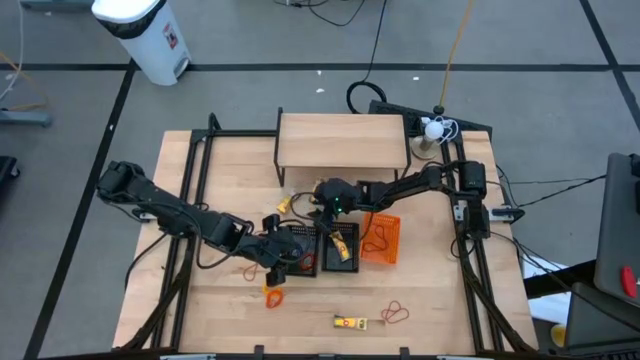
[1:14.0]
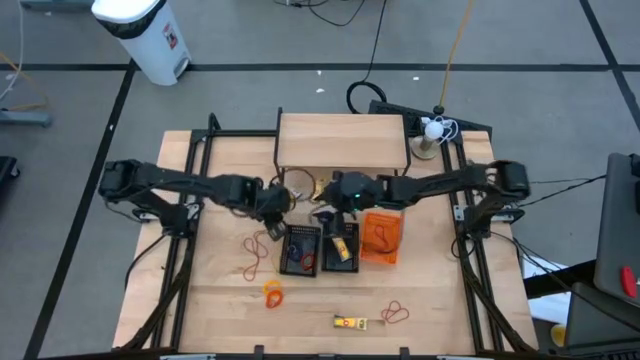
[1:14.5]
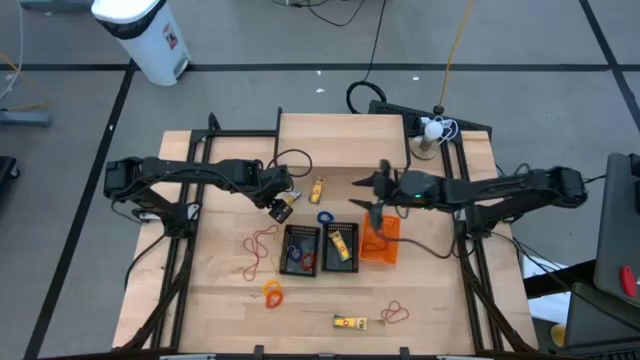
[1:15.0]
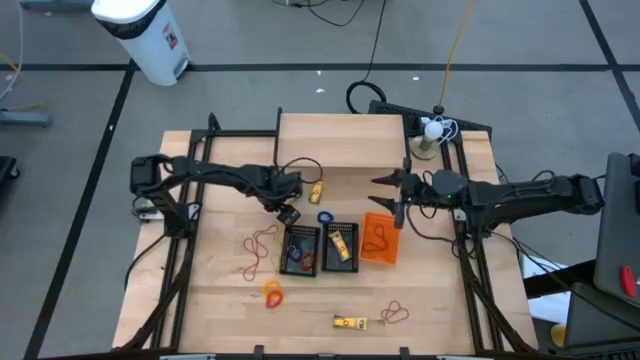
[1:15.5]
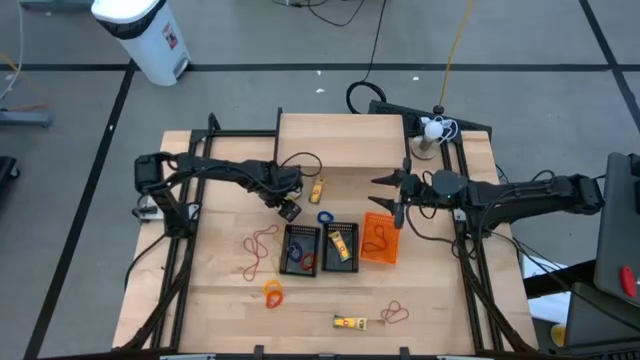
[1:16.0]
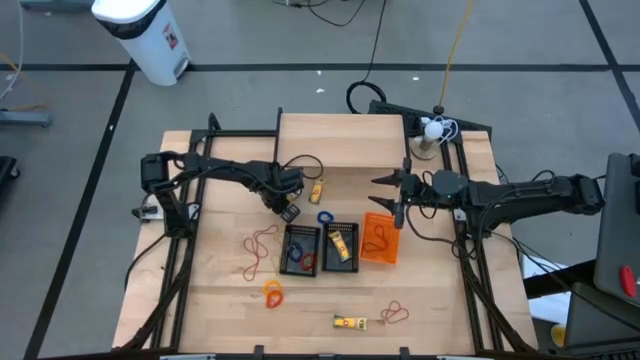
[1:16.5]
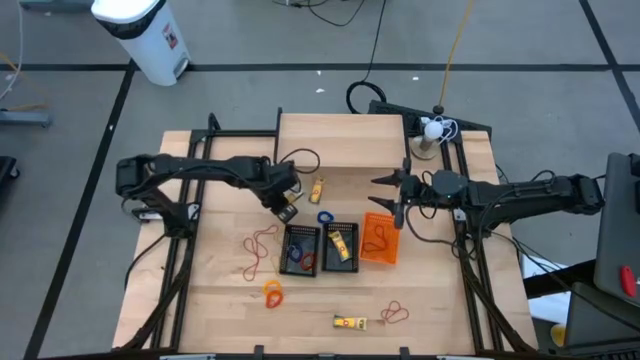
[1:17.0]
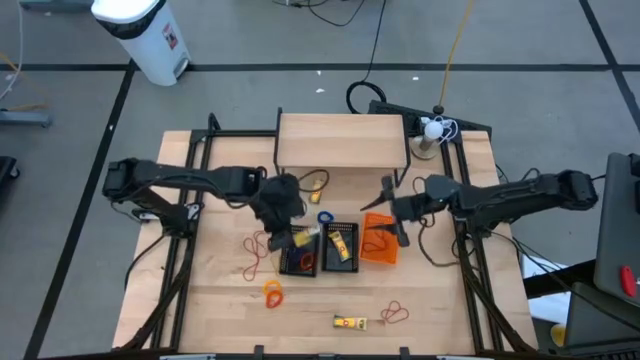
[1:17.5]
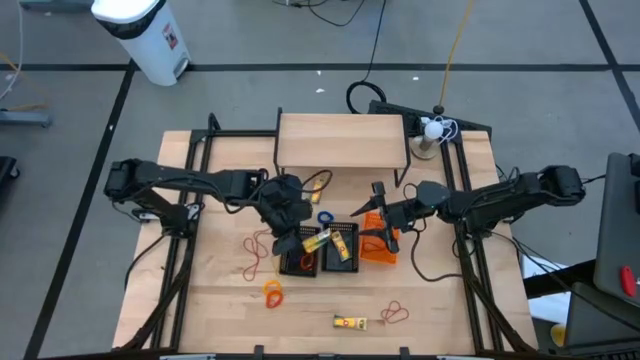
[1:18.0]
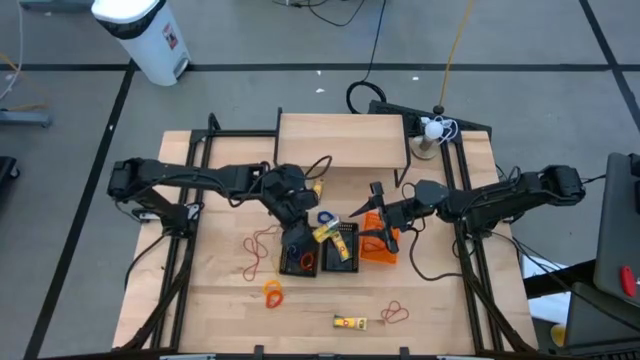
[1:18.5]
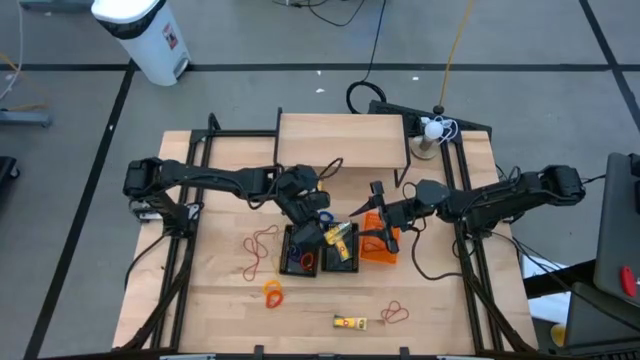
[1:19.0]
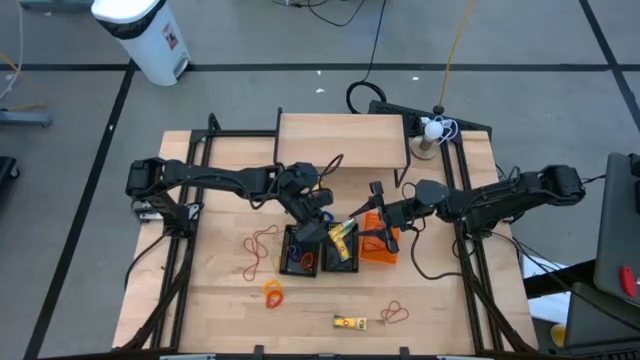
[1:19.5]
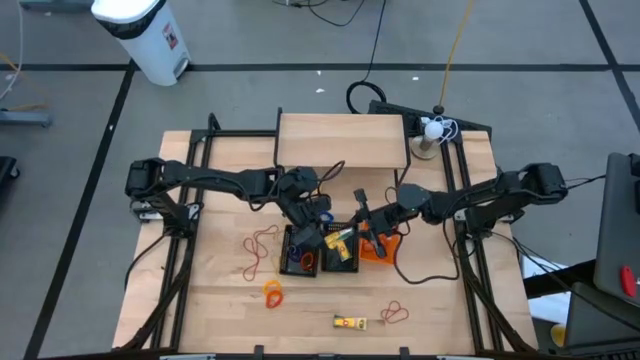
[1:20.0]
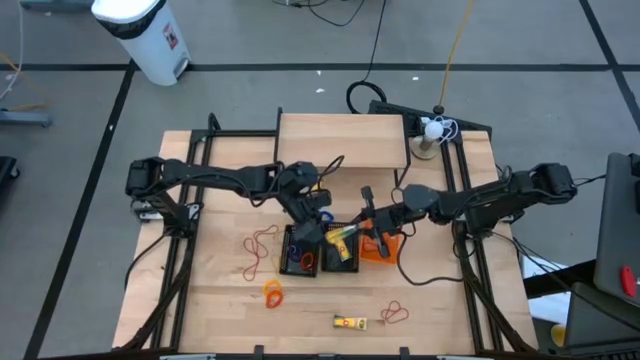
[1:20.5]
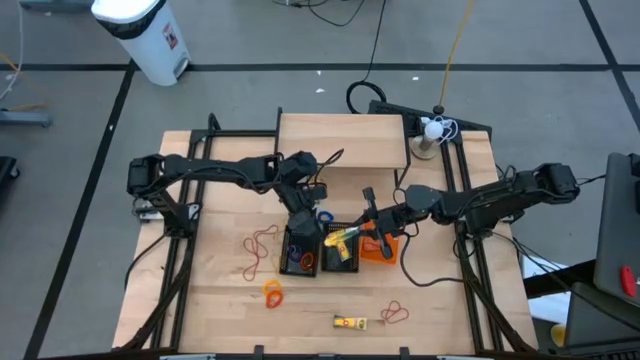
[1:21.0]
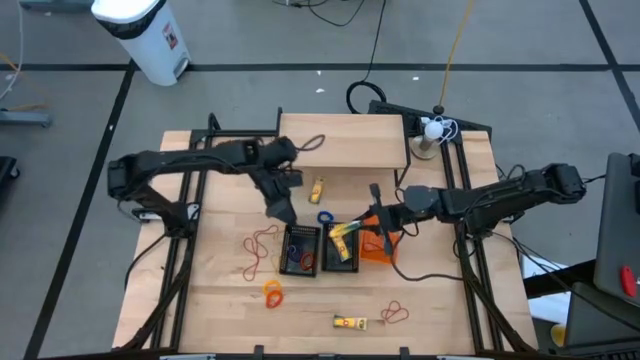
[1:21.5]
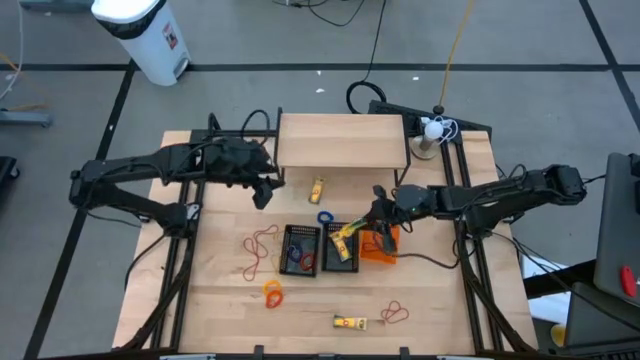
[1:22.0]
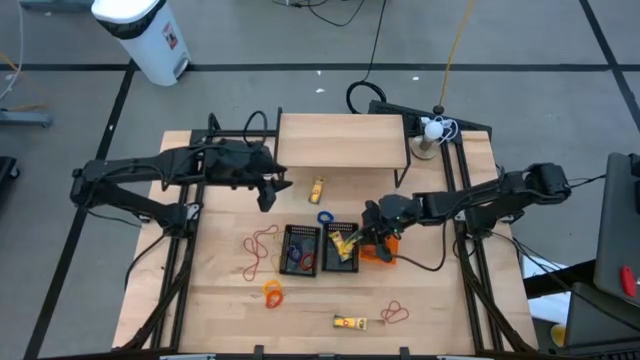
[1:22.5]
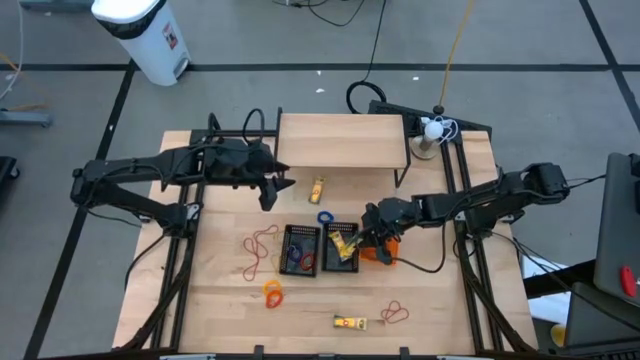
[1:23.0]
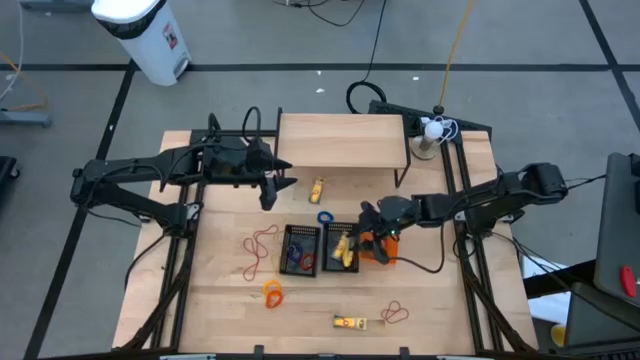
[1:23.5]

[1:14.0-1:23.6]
Task: Pick & Place Office Desk Supplies
Put the crayon box into the right black basket

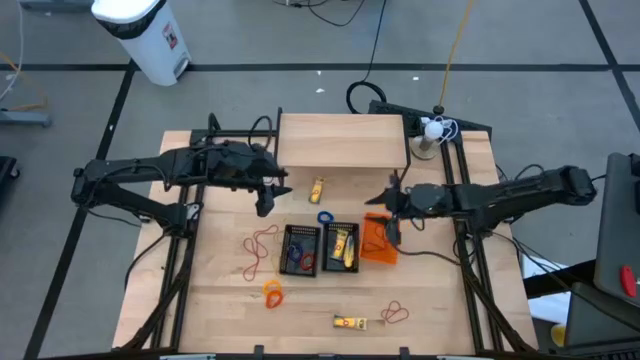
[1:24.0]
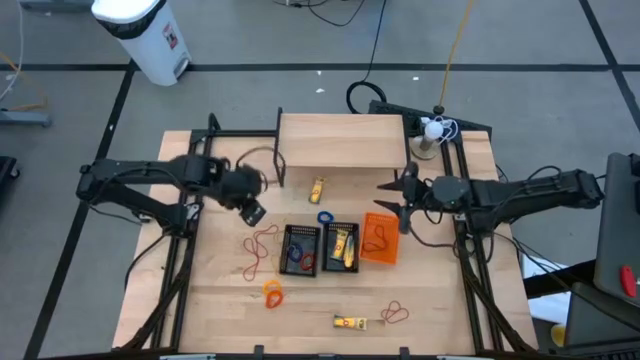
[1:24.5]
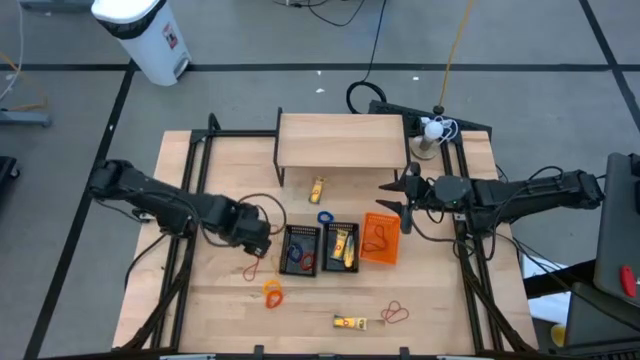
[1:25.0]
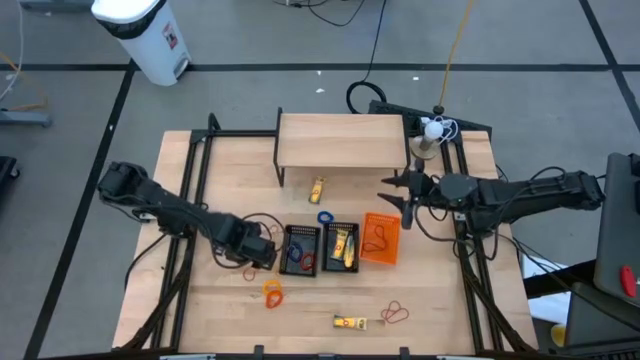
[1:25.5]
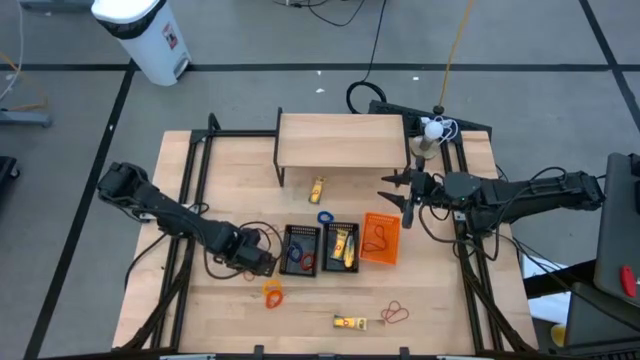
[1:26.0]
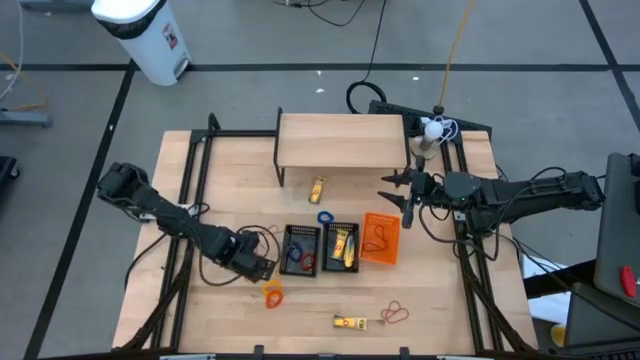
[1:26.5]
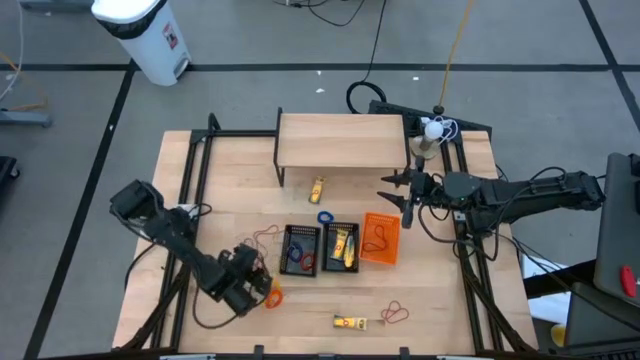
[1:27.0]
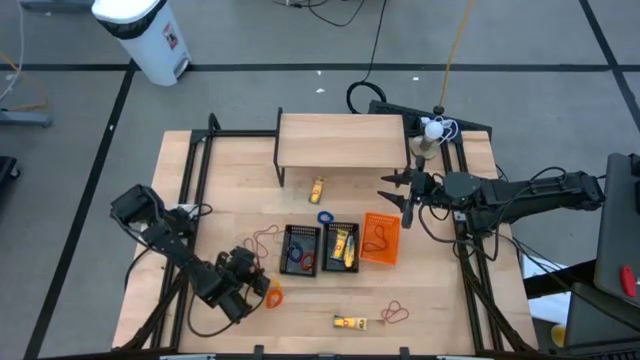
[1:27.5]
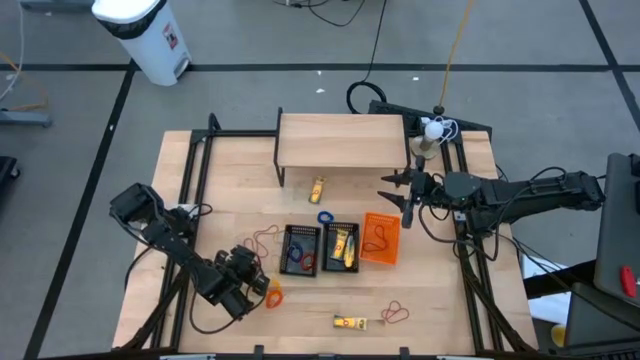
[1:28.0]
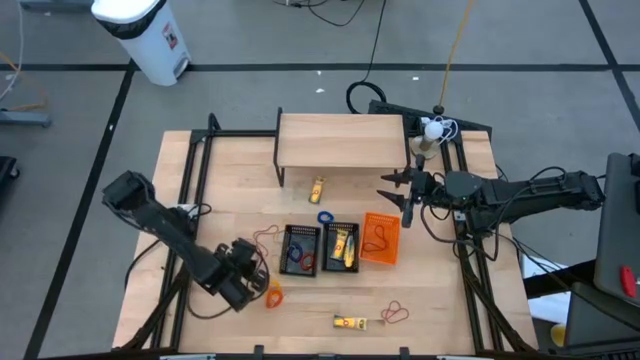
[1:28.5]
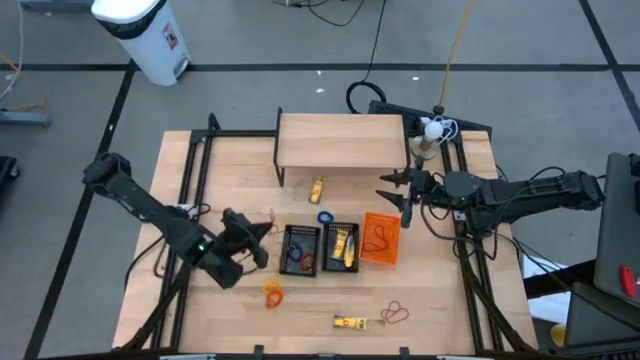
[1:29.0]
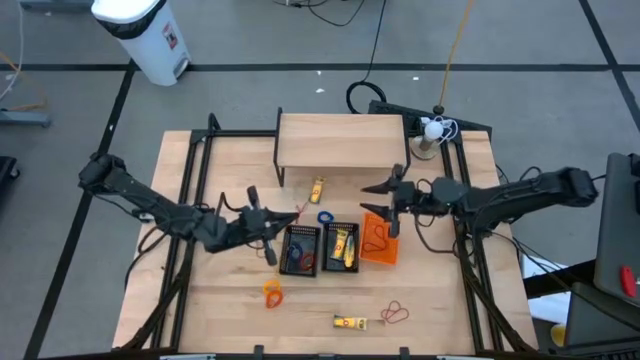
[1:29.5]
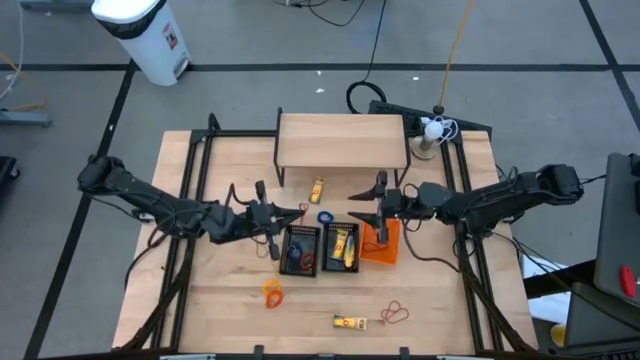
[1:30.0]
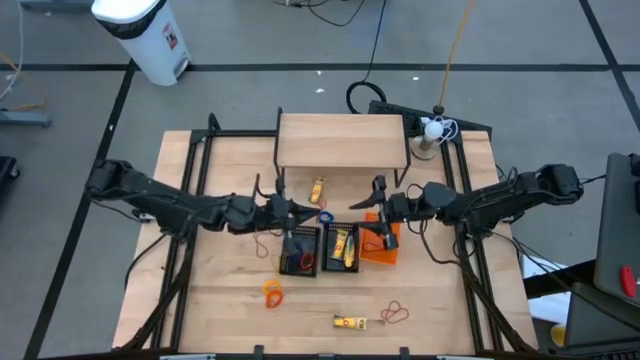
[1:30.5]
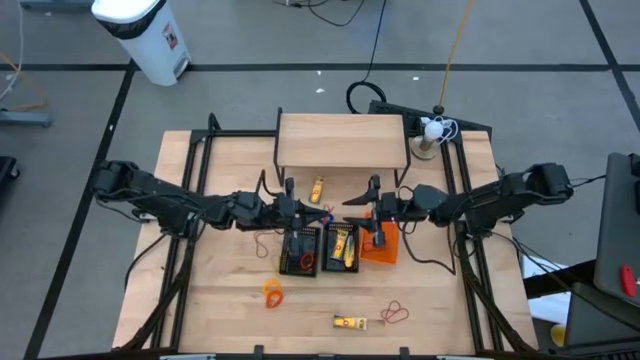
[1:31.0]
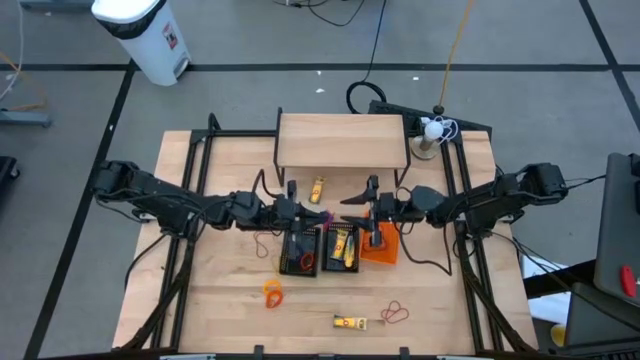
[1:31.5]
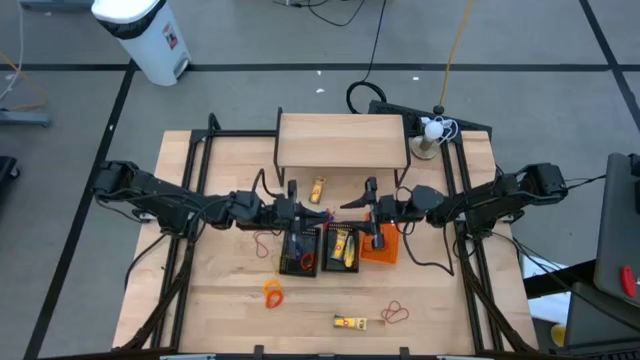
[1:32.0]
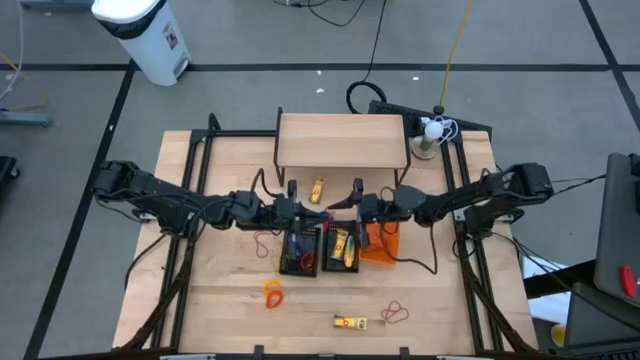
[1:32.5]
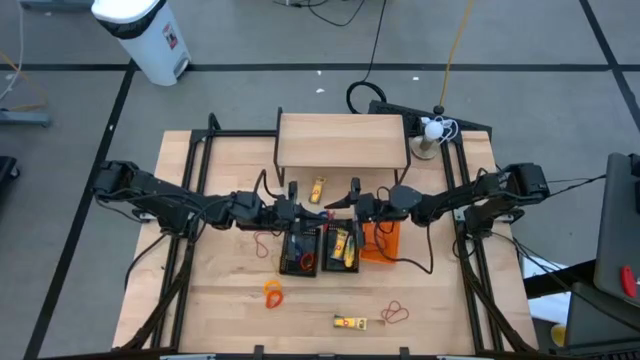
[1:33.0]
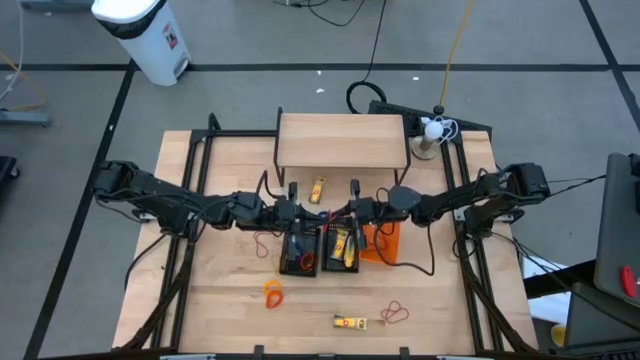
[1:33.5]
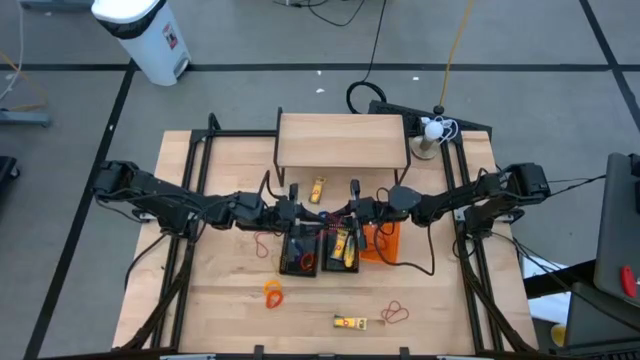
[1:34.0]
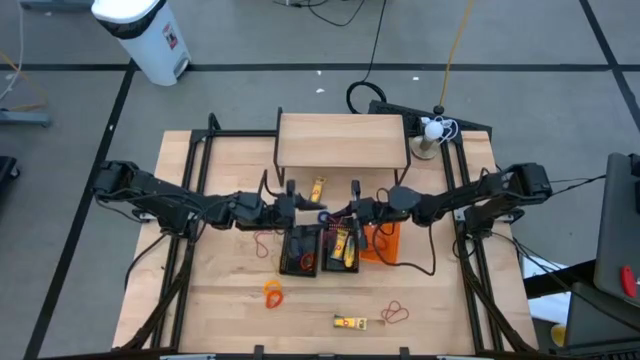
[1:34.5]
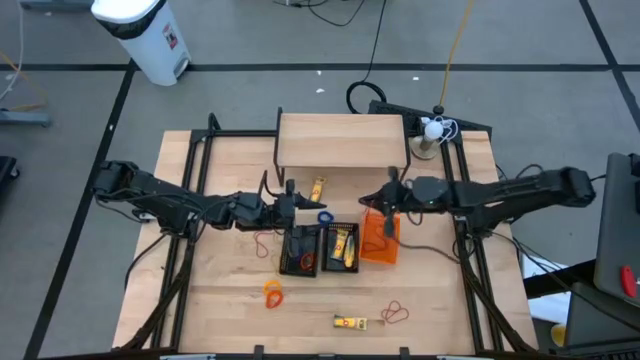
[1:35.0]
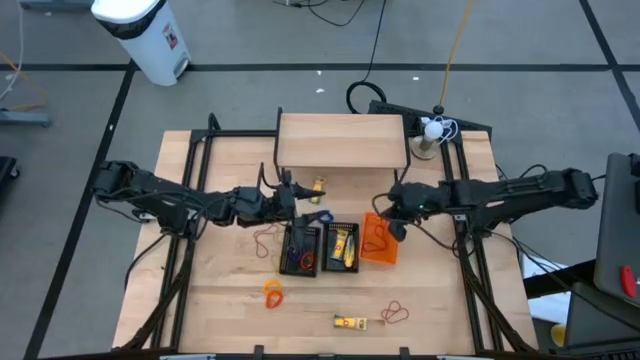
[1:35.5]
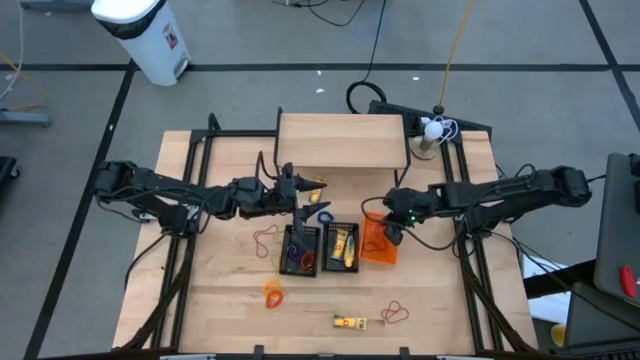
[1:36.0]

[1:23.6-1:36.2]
Put the rubber band into the orange basket
